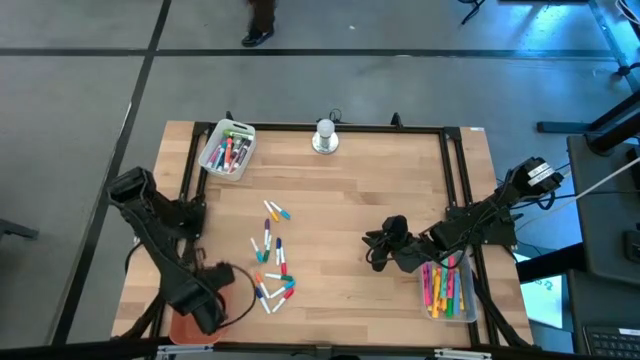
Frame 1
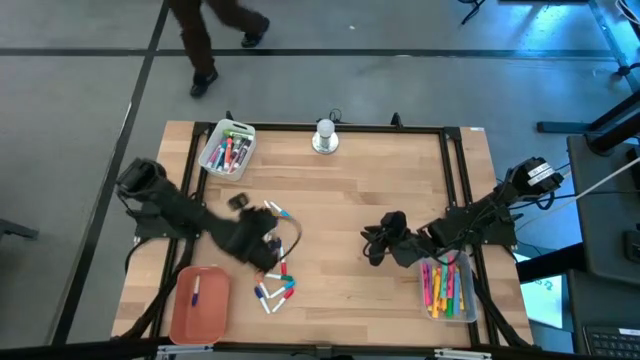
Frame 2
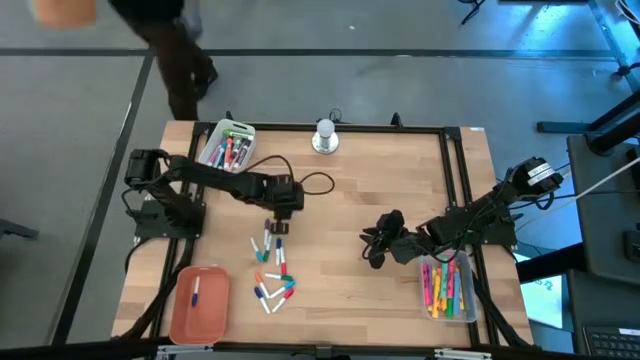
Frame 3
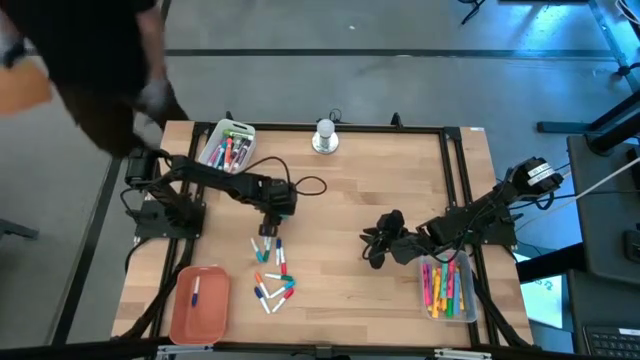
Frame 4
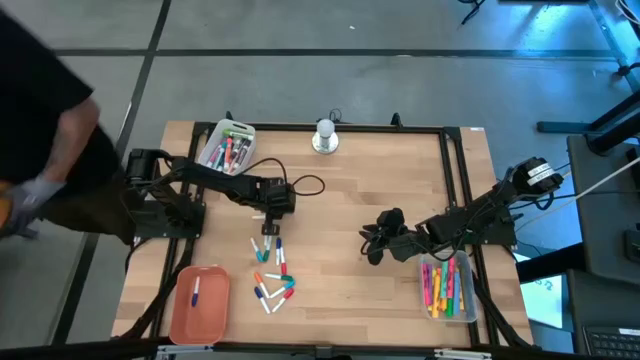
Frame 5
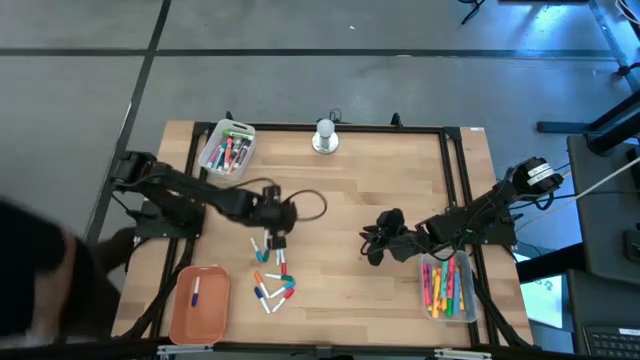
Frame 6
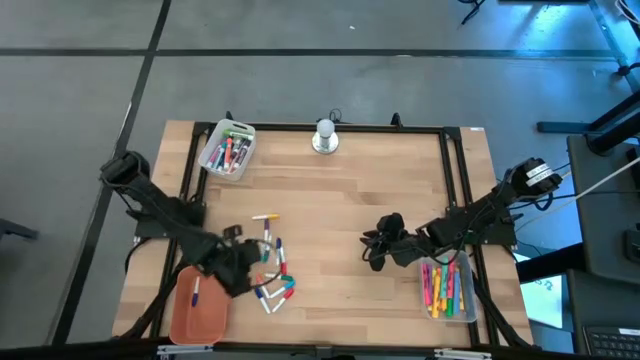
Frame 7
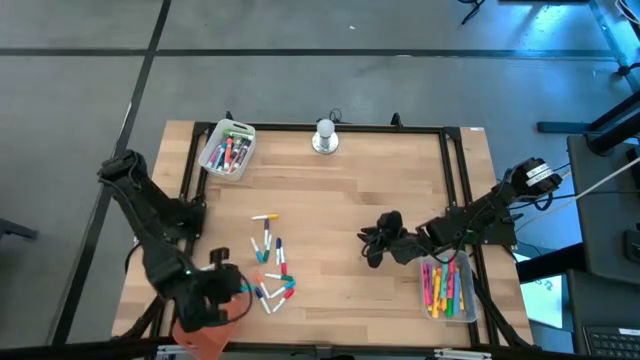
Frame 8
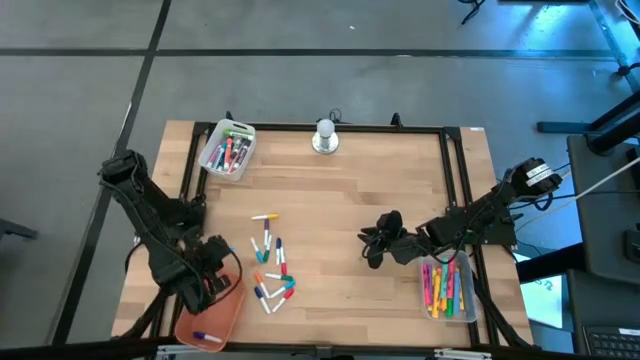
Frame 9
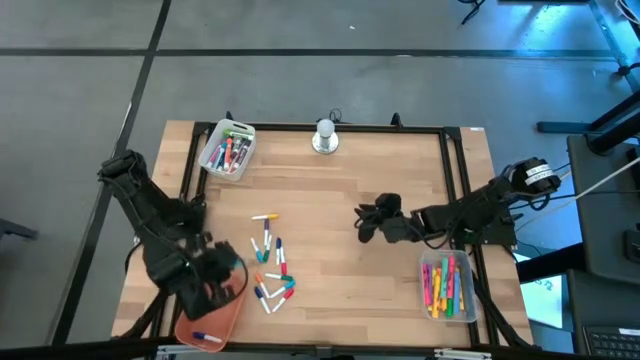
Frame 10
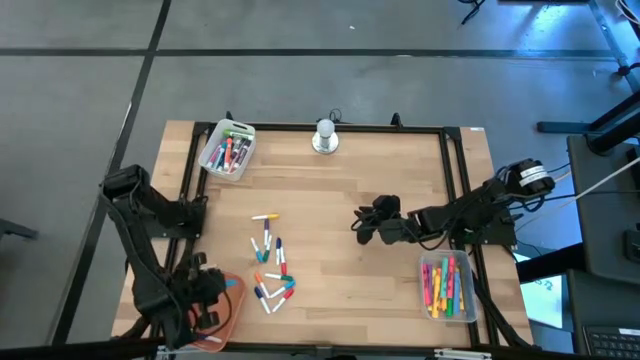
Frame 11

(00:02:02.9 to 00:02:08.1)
Task: Pick & Place Markers
Put the light blue and white highlighter pen into the orange bin

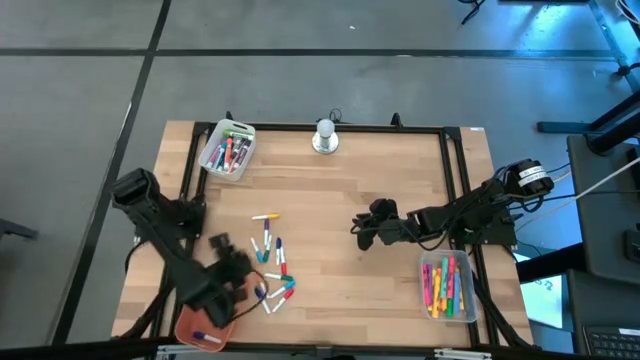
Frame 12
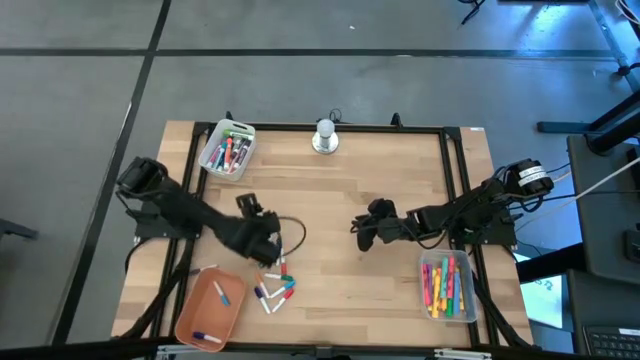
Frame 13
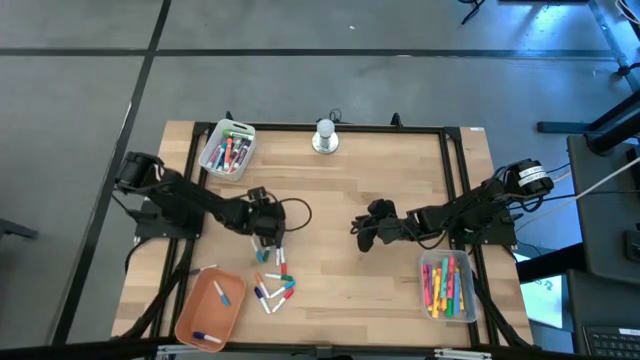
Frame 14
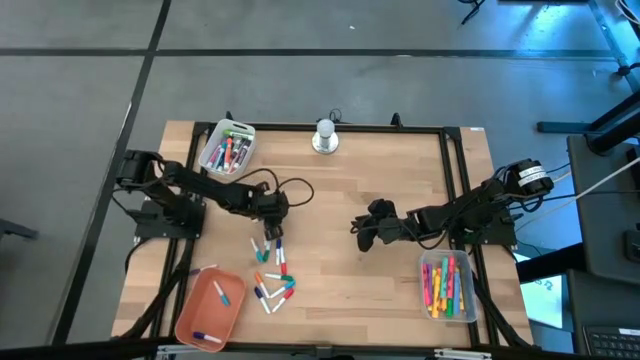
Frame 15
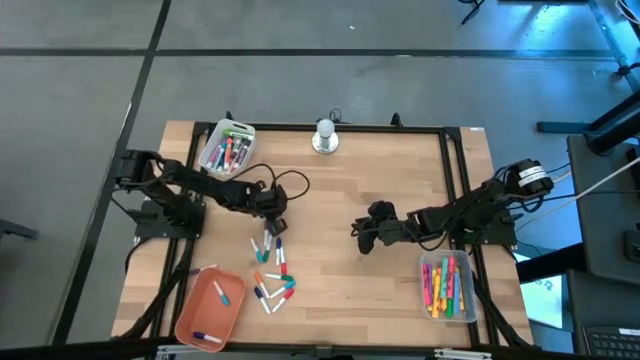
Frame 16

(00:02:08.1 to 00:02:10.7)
Put the yellow and white highlighter pen into the orange bin

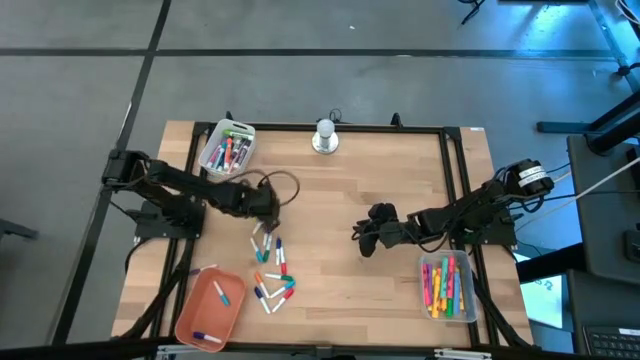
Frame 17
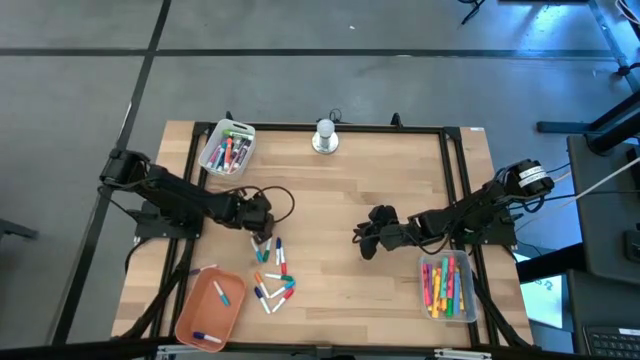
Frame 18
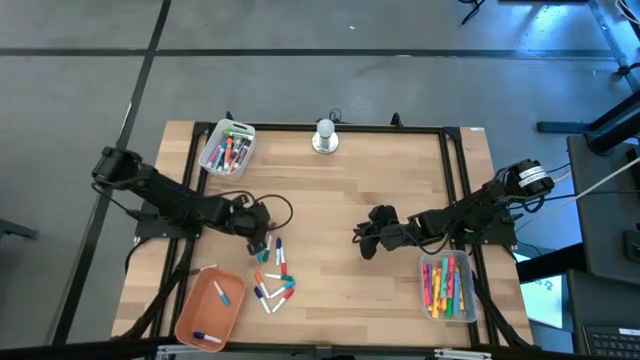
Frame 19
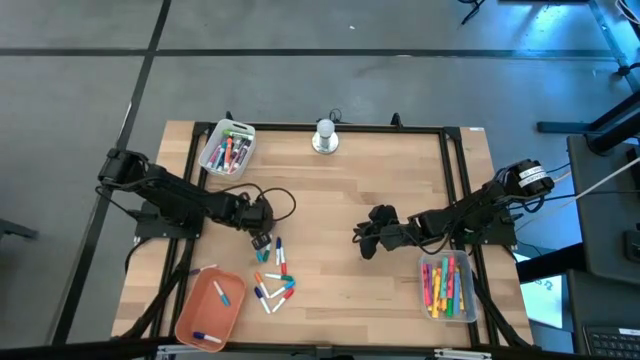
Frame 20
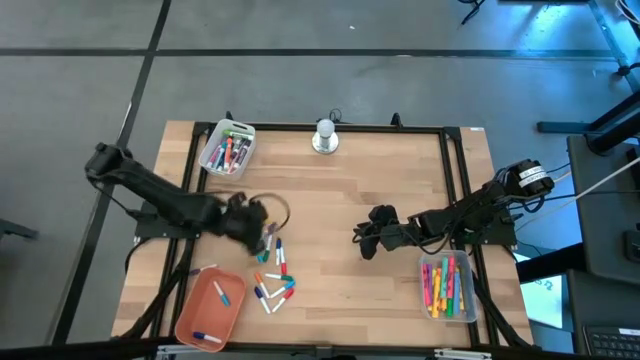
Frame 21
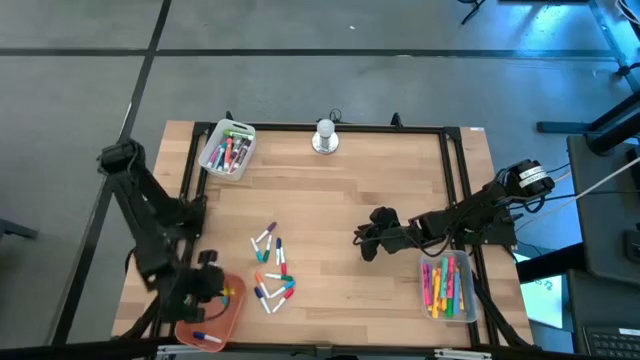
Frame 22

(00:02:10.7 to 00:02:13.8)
Put the yellow and white highlighter pen into the orange bin

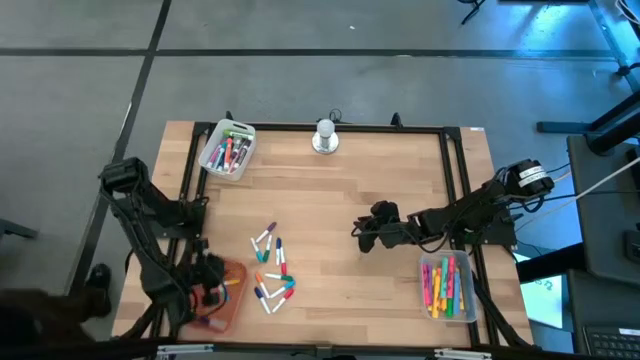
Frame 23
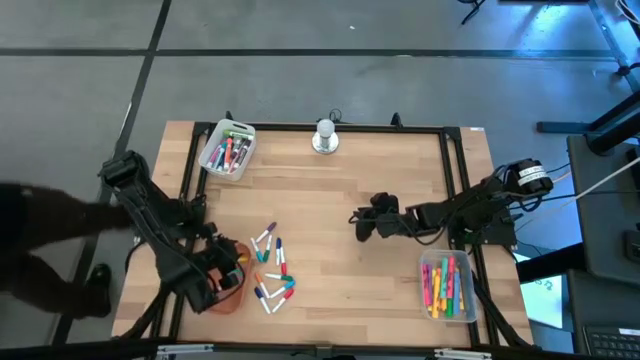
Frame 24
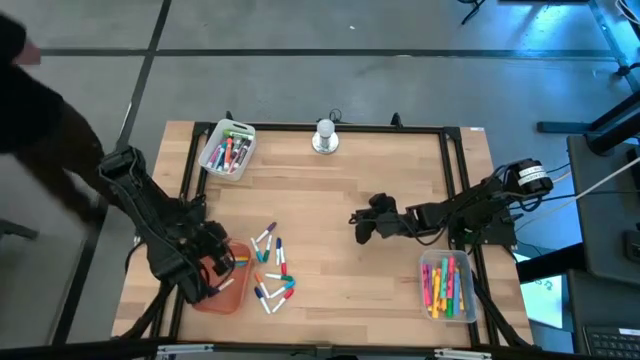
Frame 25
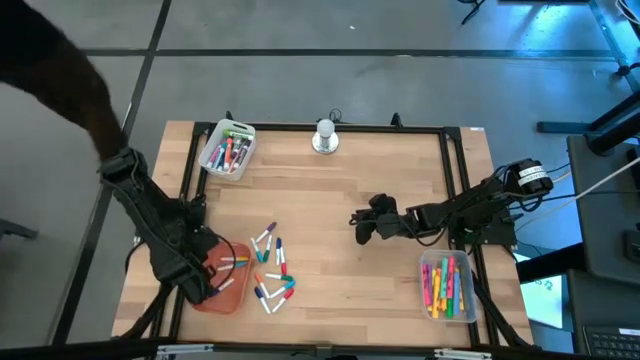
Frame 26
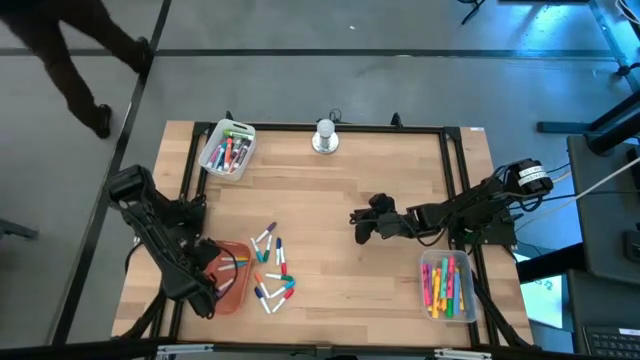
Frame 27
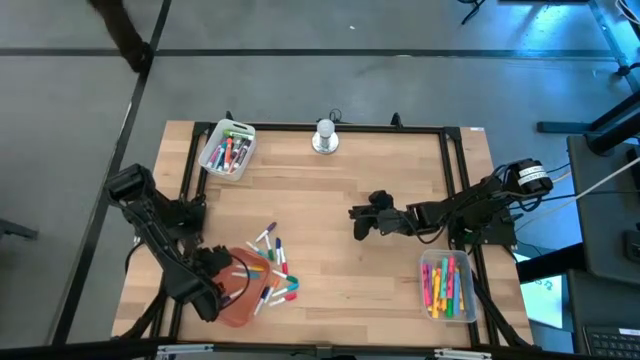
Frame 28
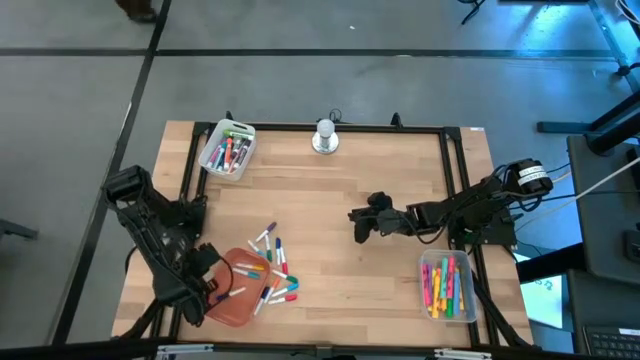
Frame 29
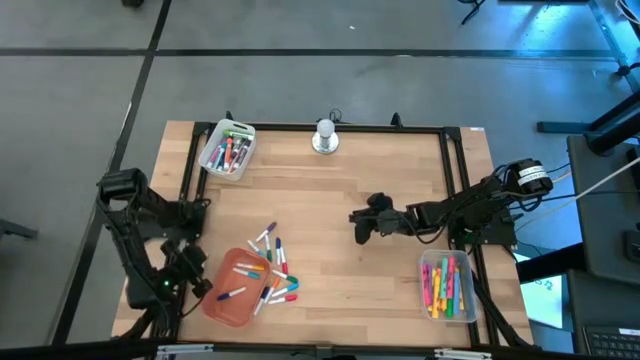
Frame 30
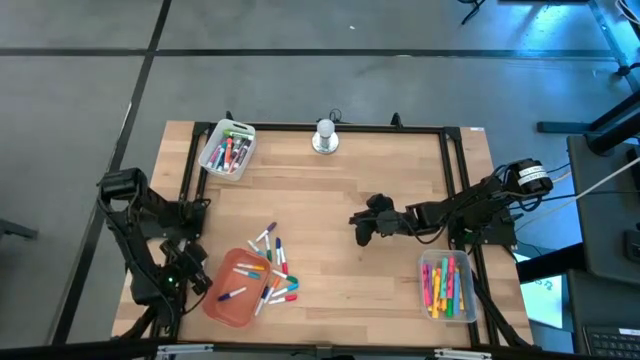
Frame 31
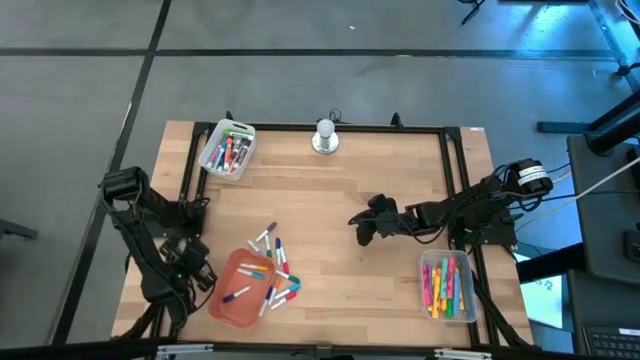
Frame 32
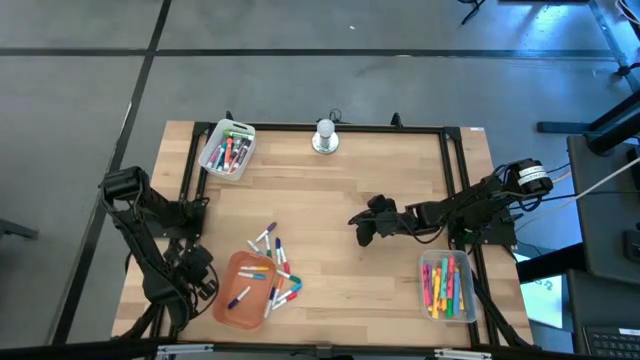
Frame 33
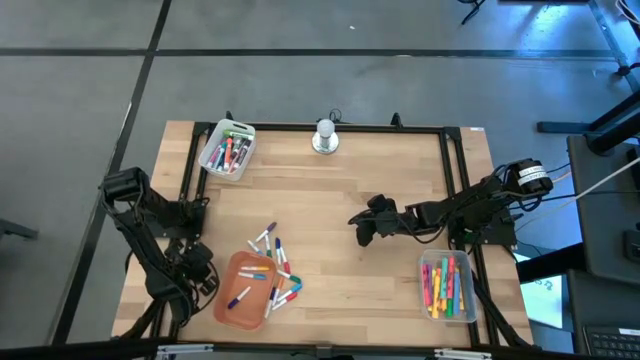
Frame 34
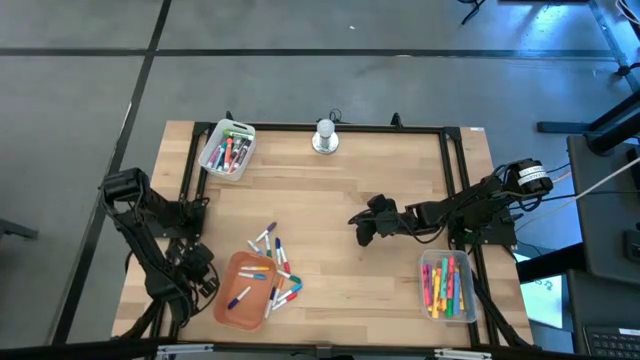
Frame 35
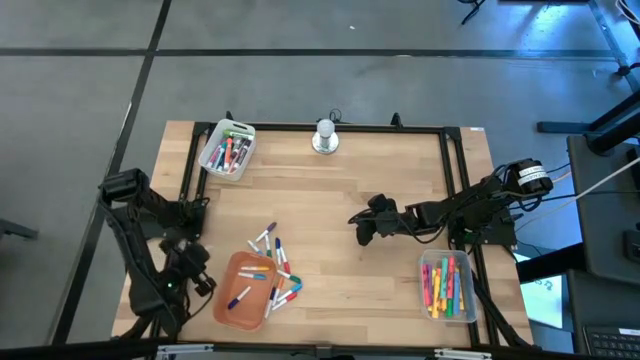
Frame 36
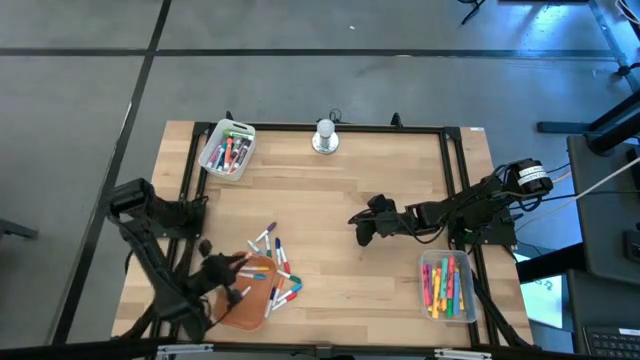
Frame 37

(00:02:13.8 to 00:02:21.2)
Put the dark blue and white highlighter pen into the orange bin

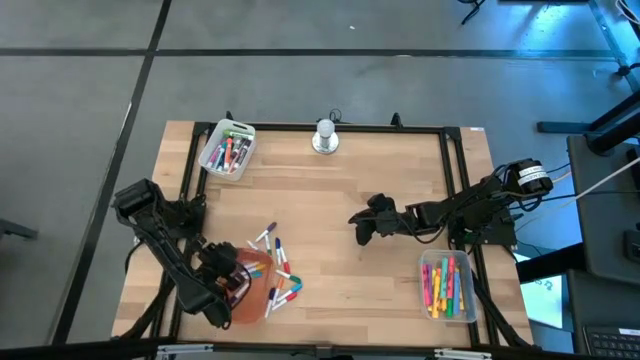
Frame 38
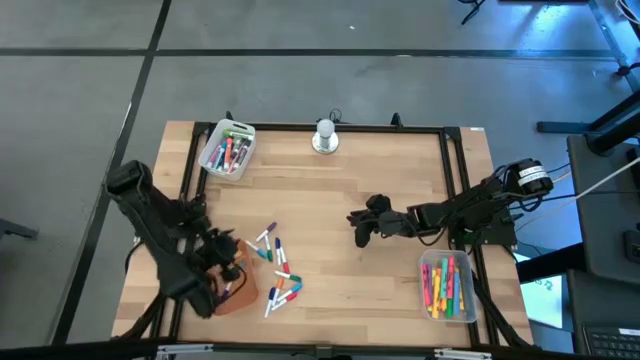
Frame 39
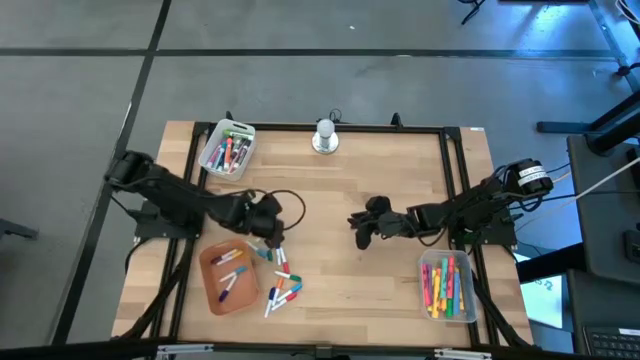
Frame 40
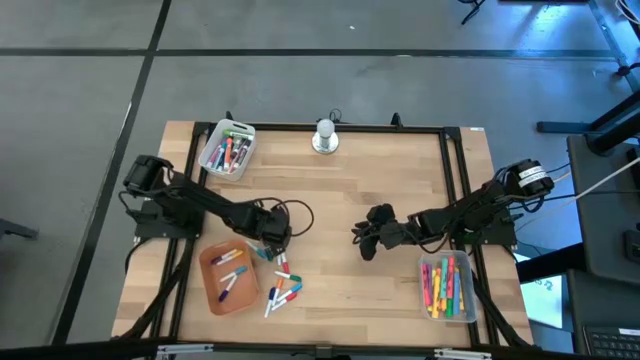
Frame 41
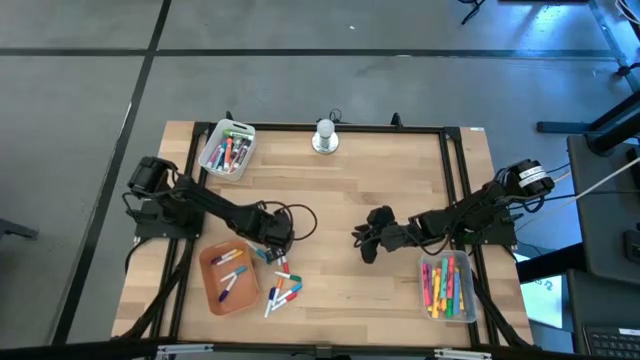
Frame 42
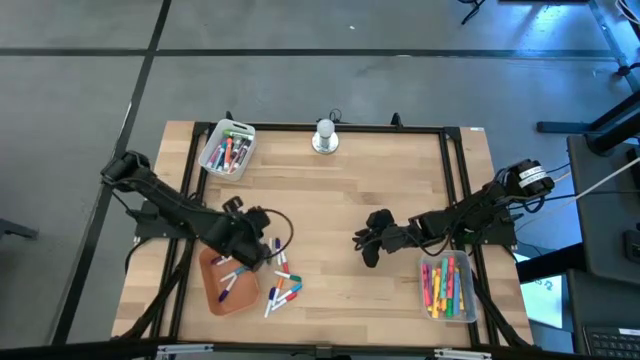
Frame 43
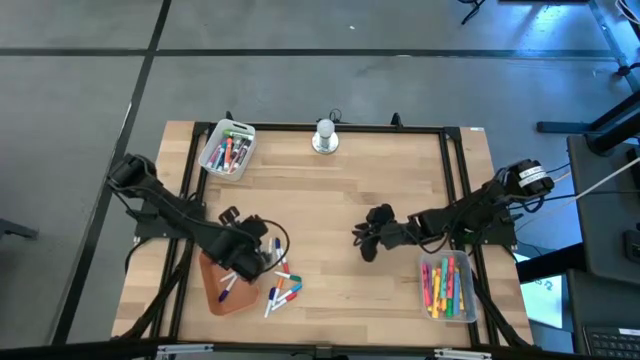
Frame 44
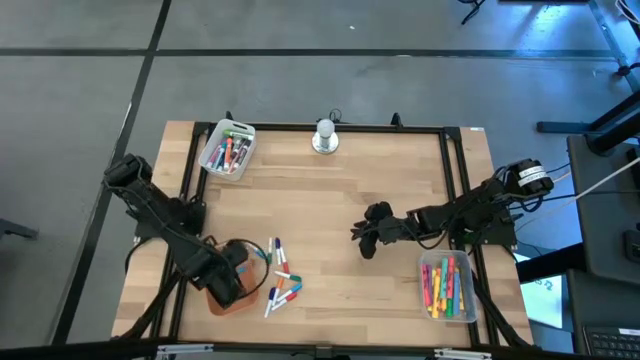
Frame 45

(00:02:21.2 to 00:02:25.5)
Put the dark blue and white highlighter pen into the orange bin
